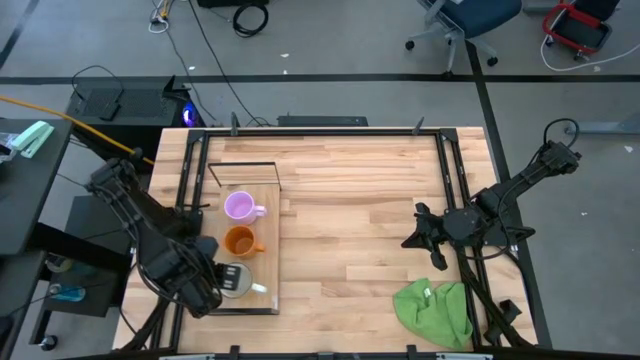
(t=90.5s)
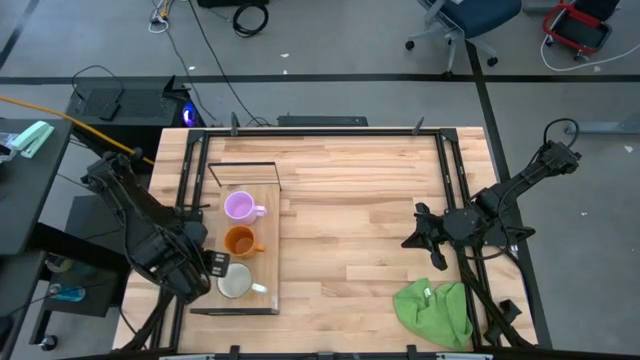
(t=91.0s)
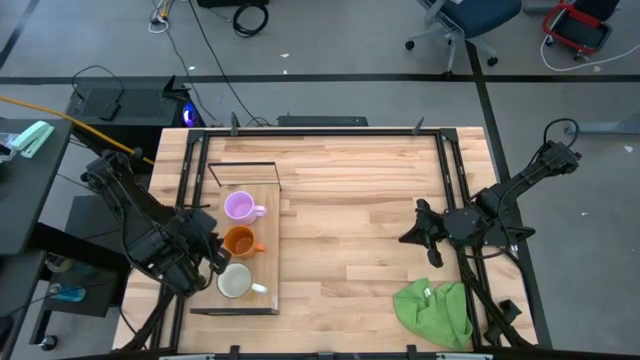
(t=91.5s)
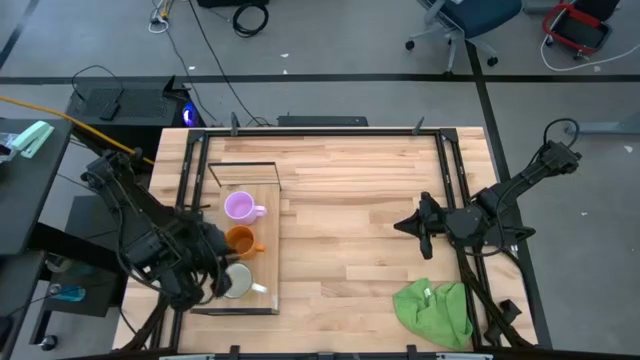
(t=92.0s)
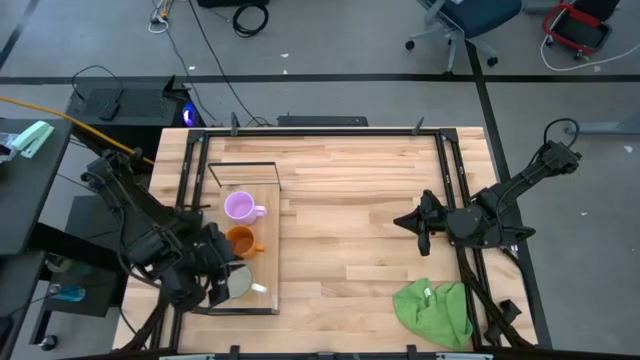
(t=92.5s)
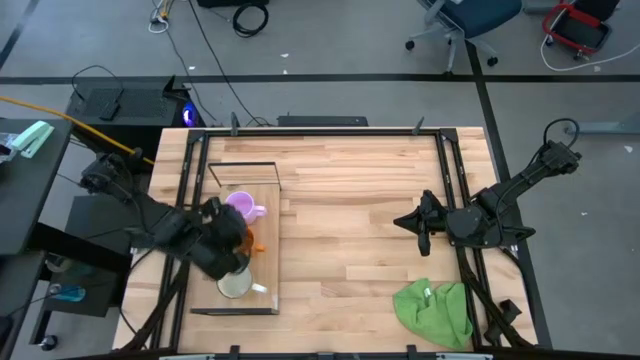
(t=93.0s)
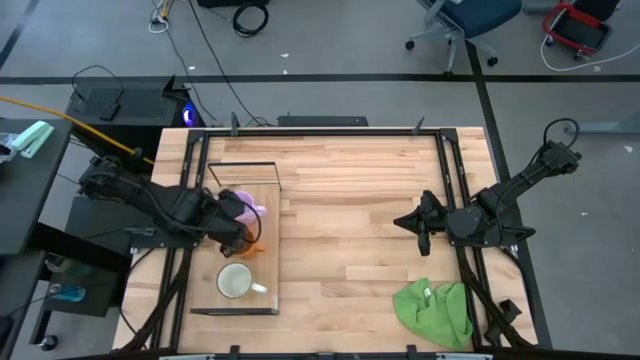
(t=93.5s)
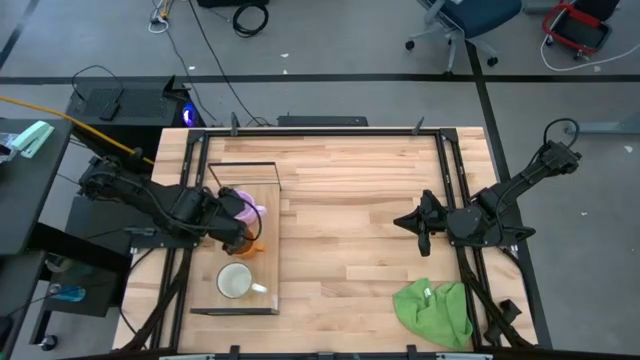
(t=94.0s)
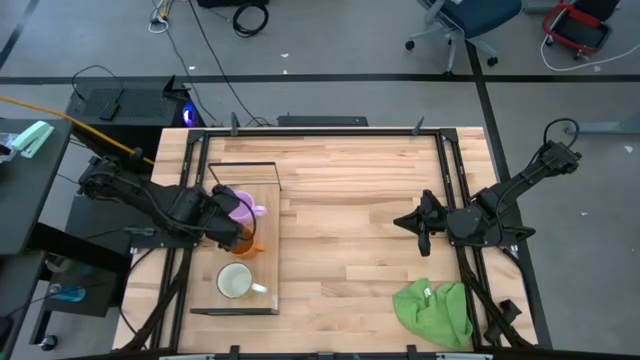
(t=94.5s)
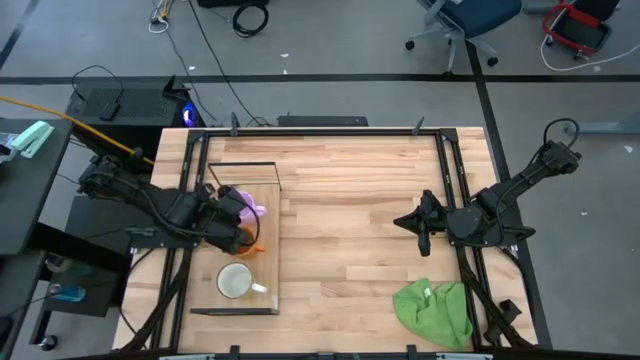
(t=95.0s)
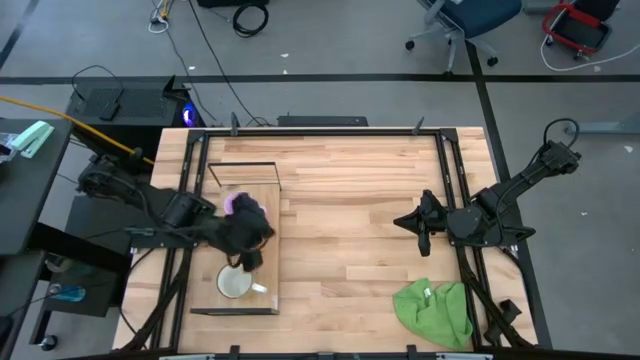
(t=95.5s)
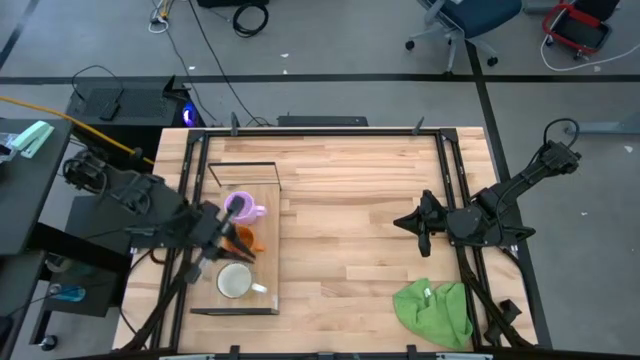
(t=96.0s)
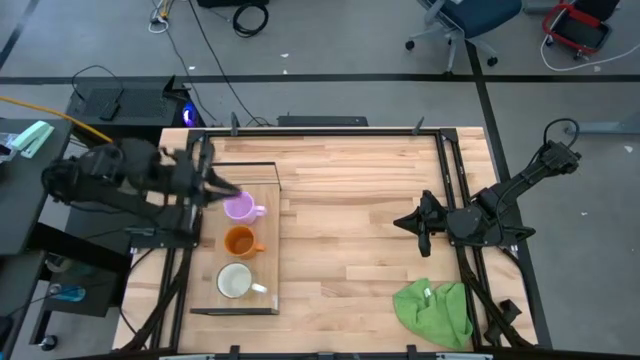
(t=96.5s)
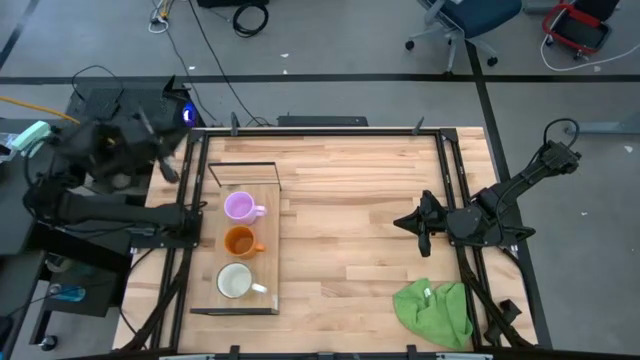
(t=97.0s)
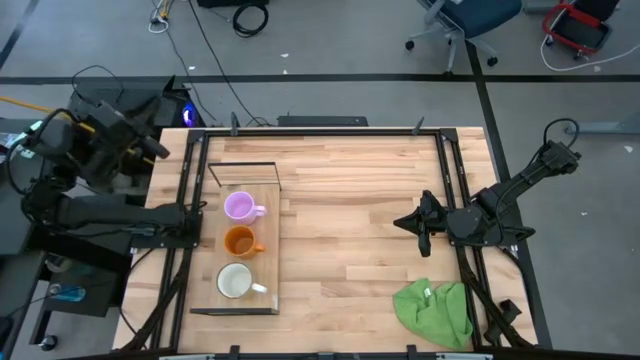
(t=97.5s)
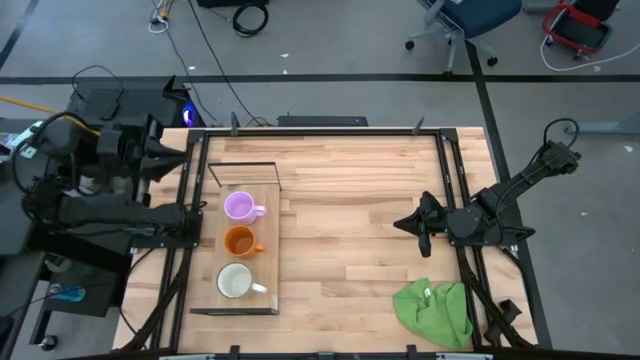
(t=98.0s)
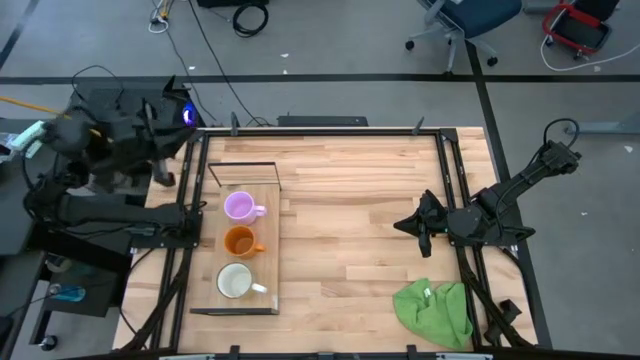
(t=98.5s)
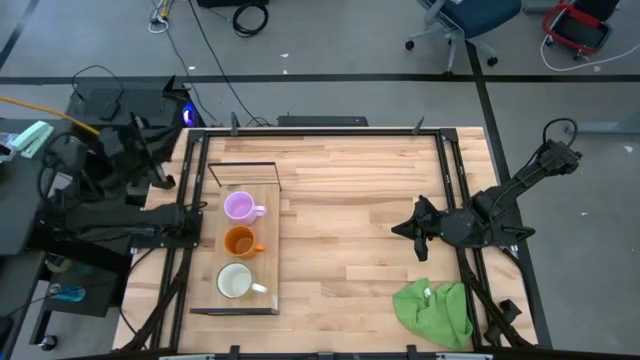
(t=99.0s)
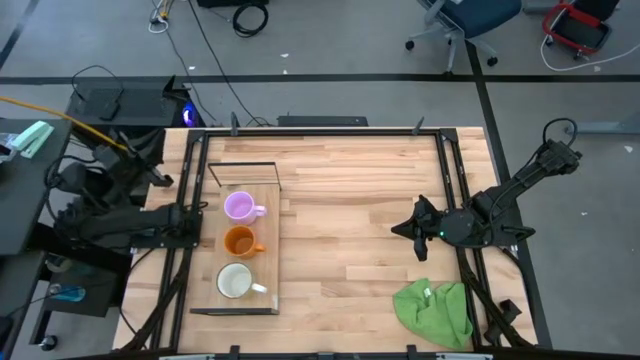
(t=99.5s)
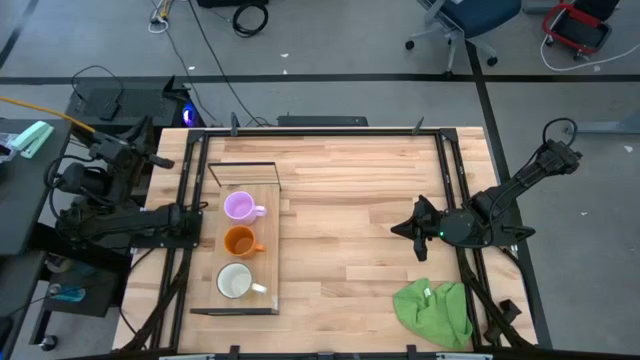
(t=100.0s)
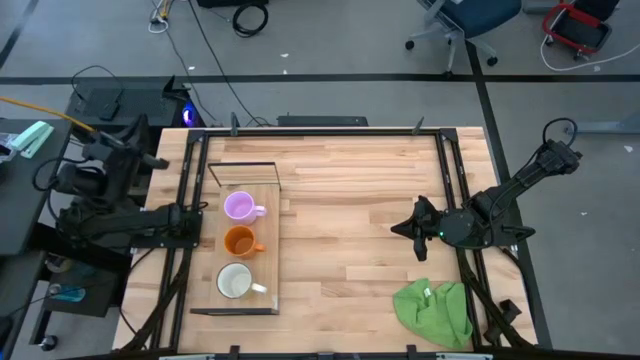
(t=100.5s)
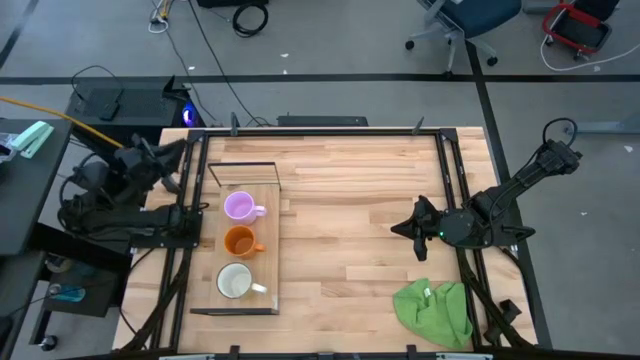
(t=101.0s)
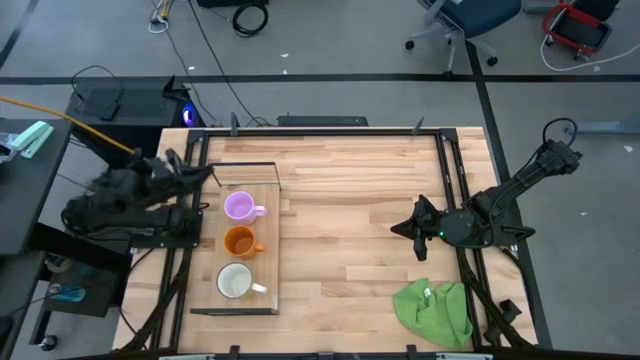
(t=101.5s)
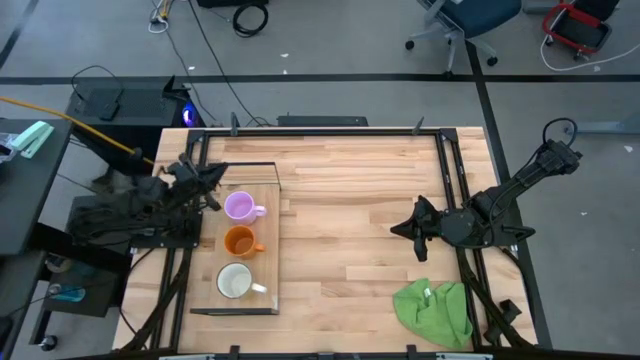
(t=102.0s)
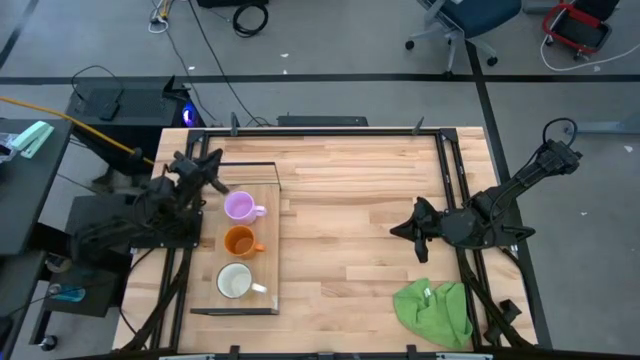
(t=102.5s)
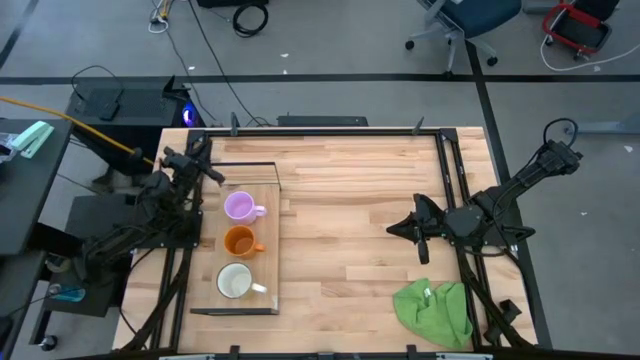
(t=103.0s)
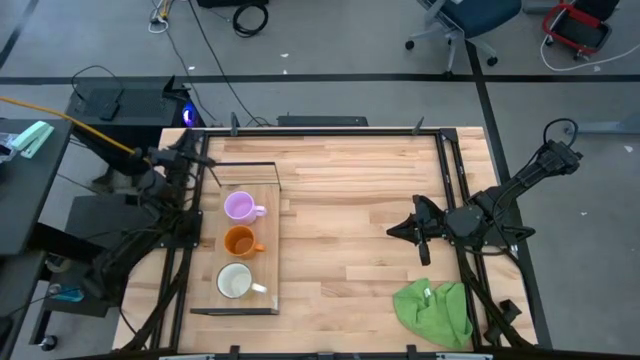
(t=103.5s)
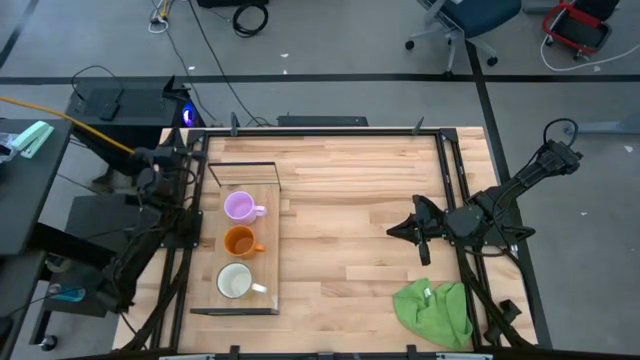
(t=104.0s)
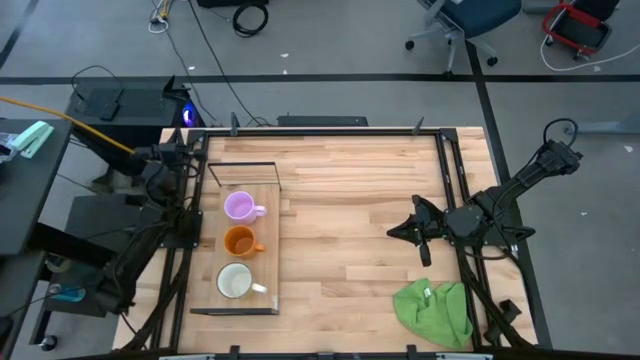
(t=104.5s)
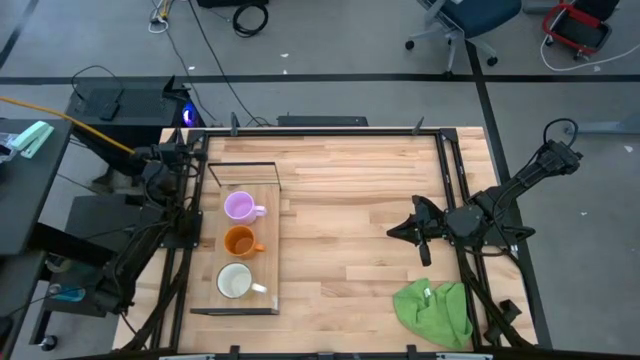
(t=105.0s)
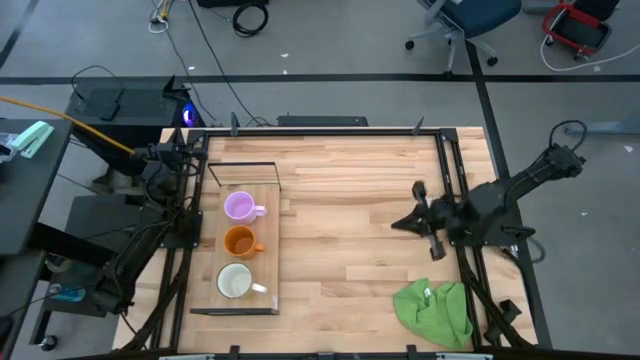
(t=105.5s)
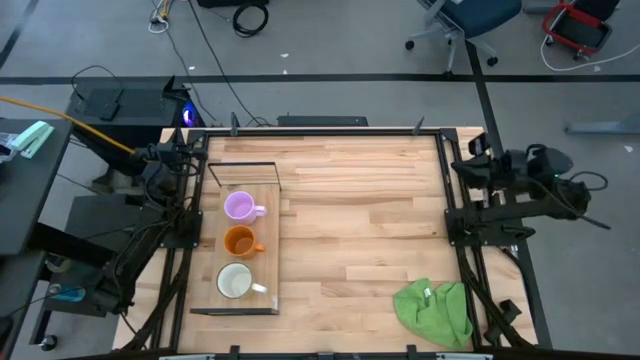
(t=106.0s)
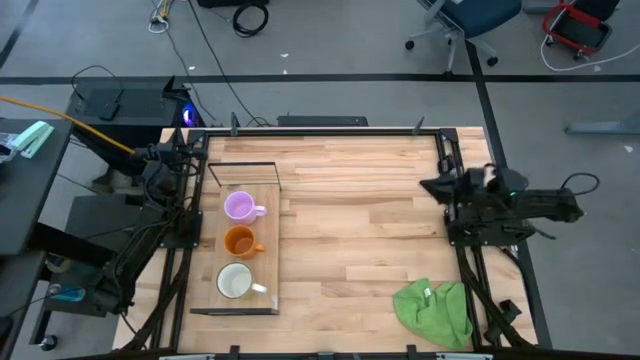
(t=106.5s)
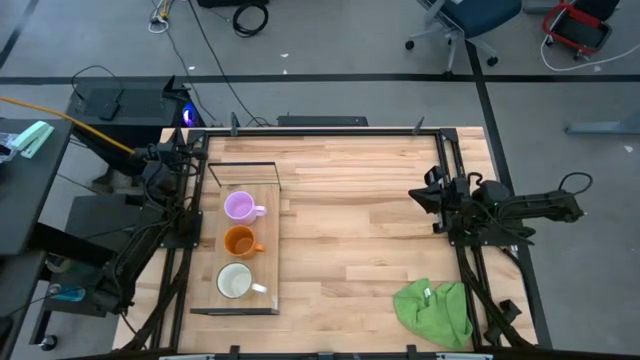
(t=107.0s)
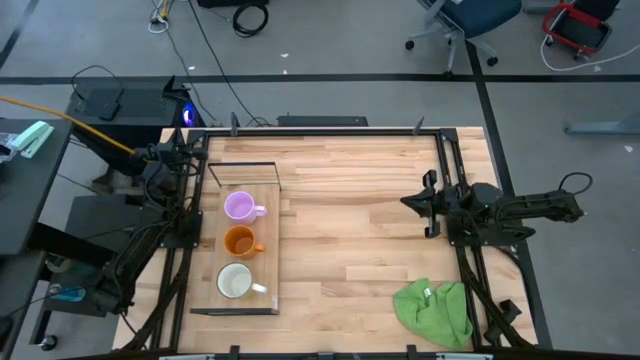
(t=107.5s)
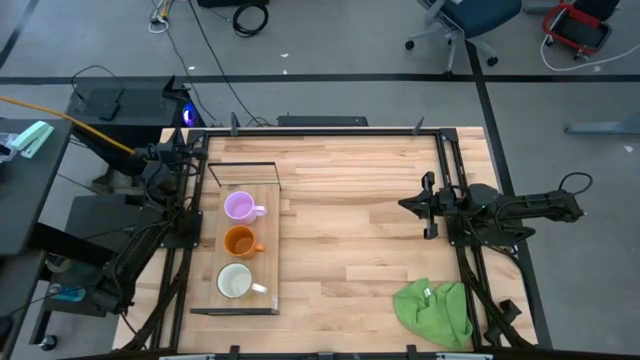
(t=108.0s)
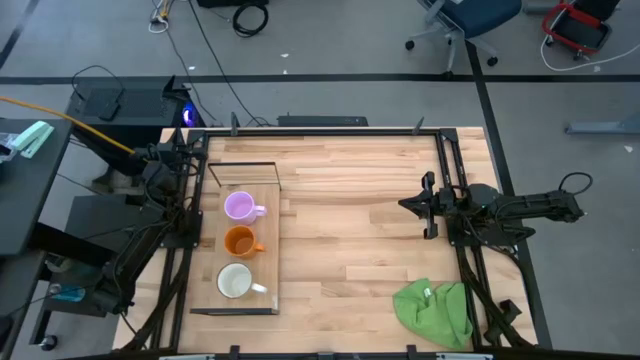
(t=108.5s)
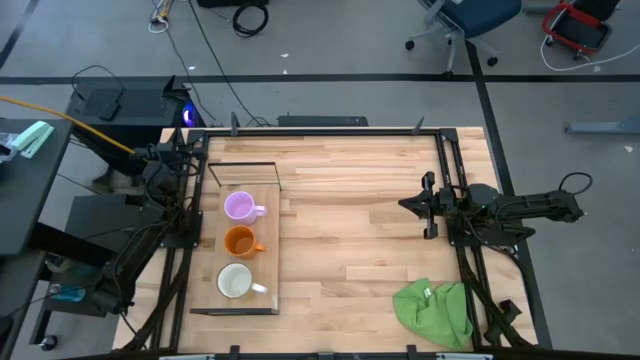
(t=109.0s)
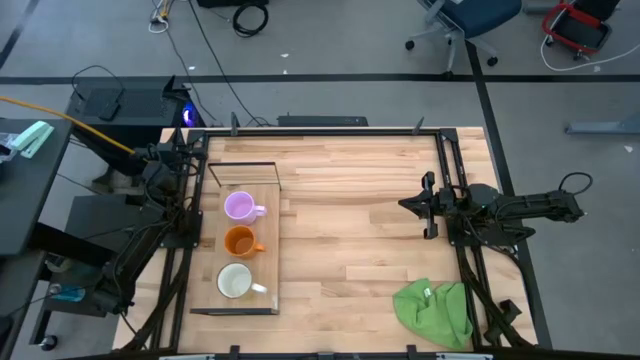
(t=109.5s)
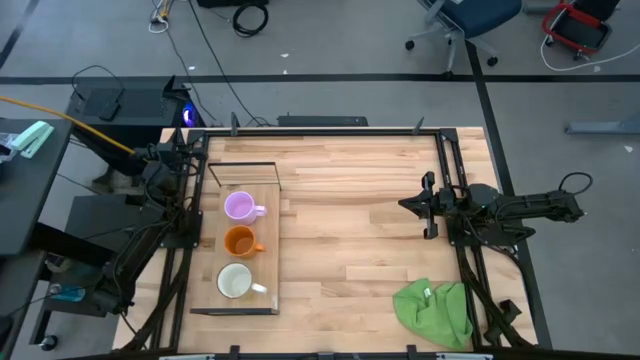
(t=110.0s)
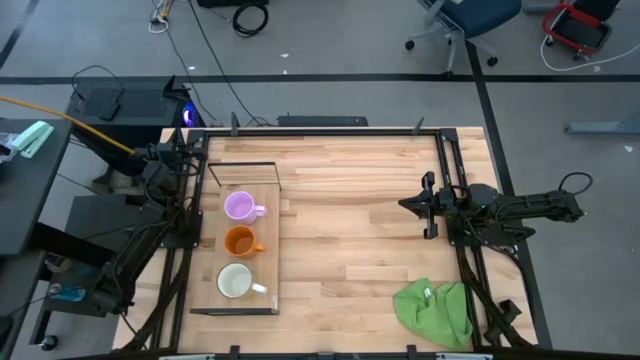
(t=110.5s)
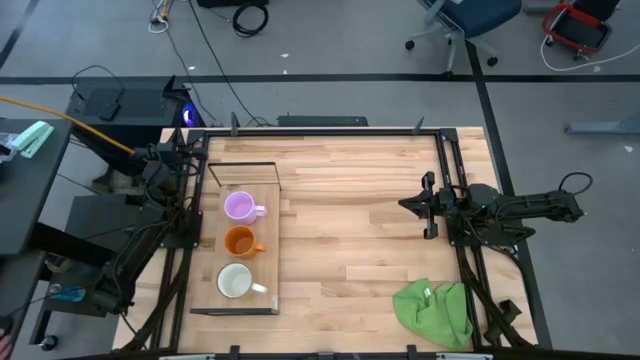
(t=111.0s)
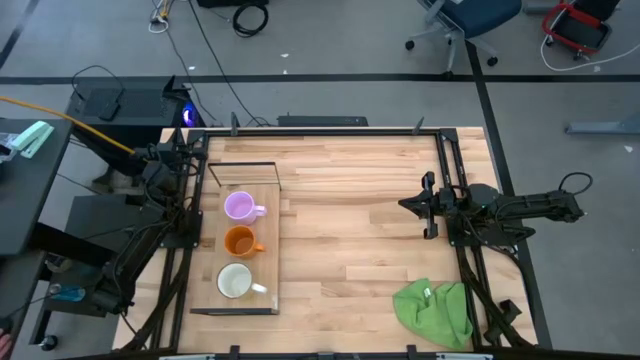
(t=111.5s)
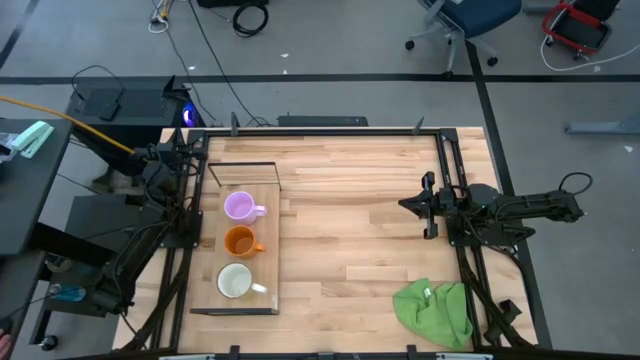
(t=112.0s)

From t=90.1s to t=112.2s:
Task: Stack small to large cups/mugs on shelf
Return to Home Position
